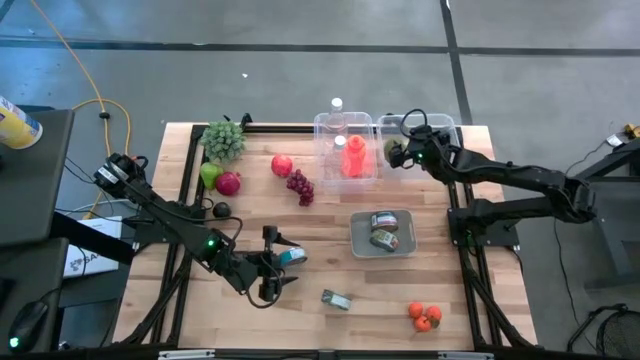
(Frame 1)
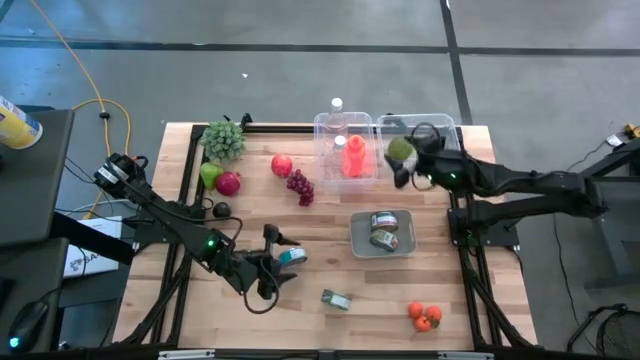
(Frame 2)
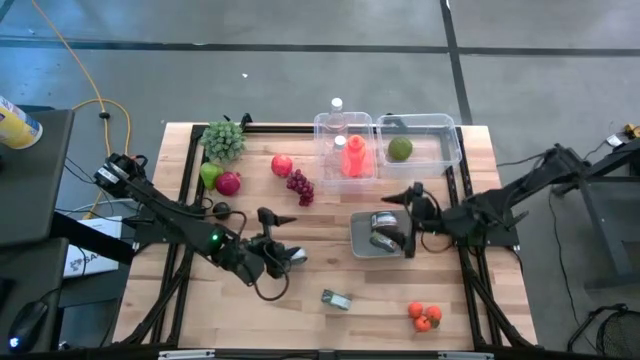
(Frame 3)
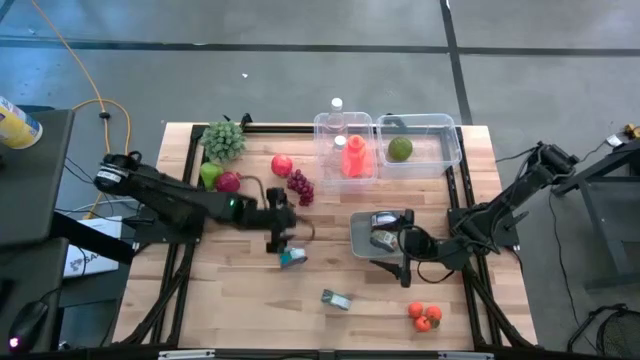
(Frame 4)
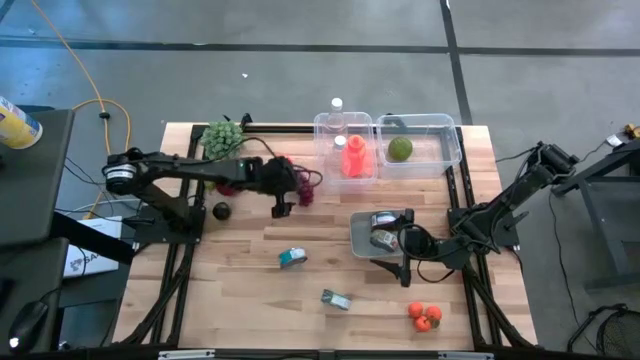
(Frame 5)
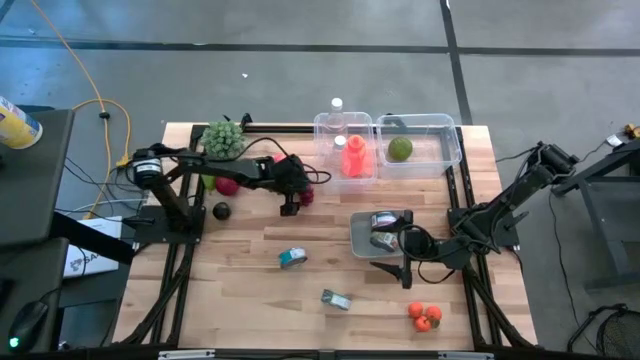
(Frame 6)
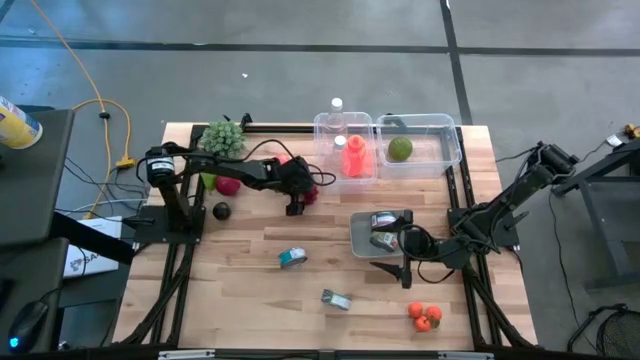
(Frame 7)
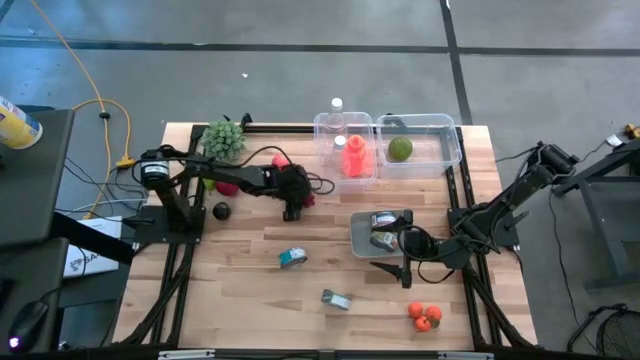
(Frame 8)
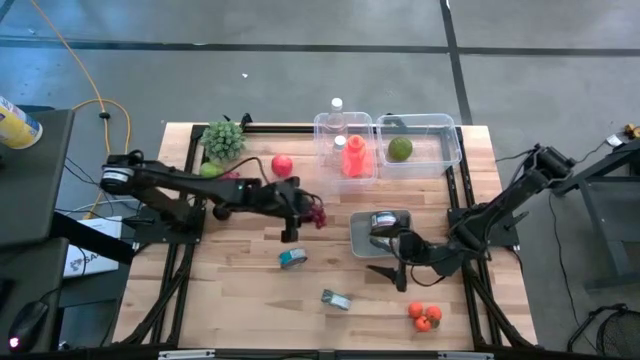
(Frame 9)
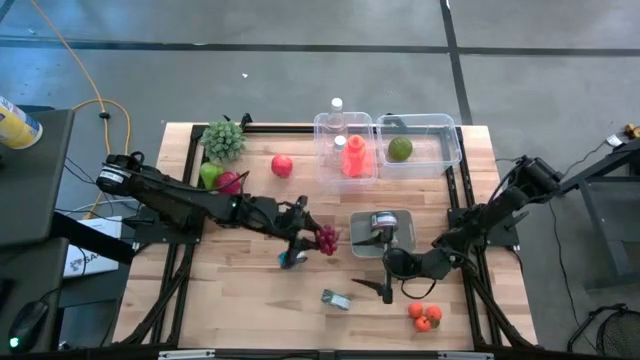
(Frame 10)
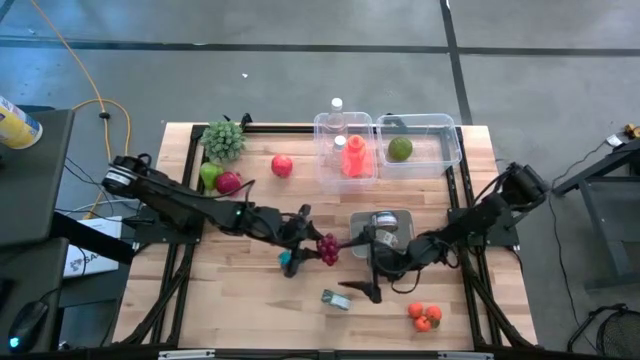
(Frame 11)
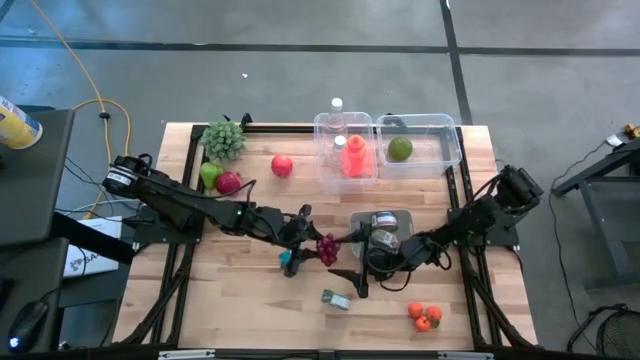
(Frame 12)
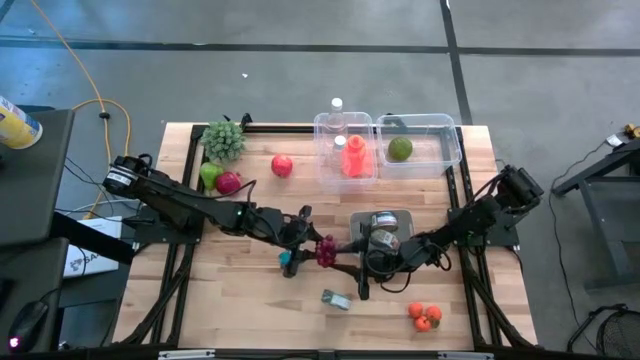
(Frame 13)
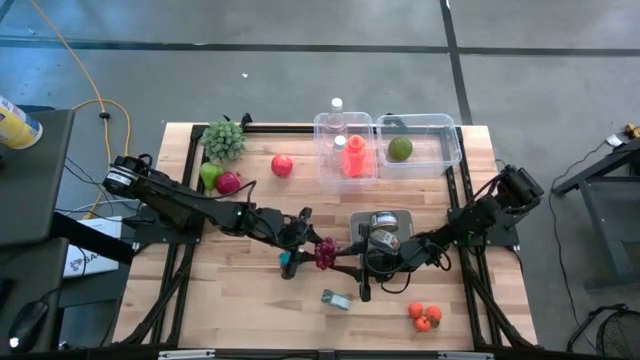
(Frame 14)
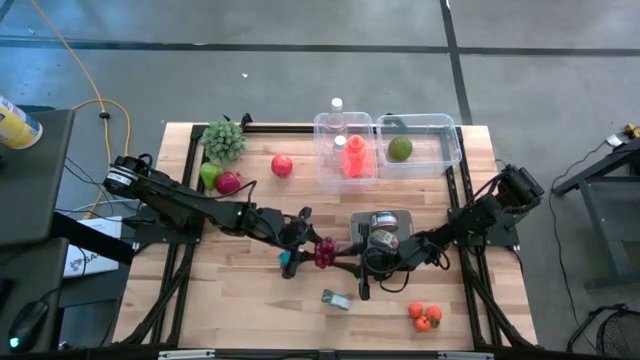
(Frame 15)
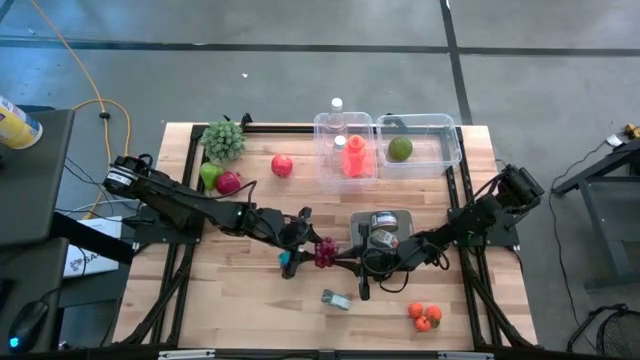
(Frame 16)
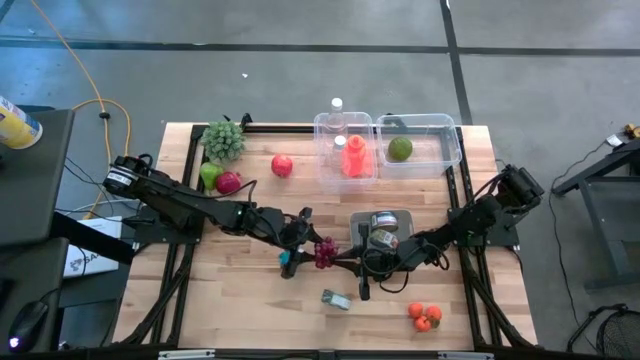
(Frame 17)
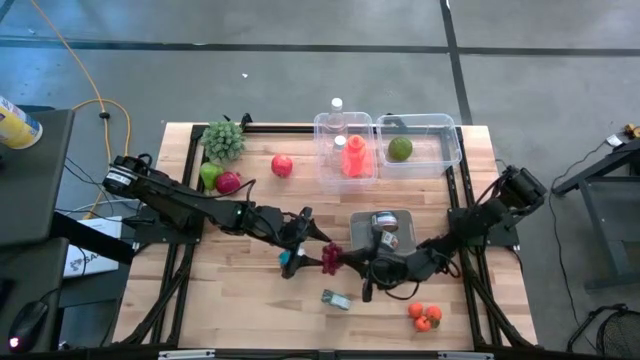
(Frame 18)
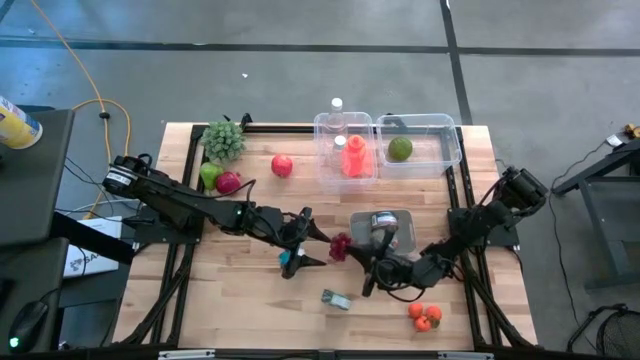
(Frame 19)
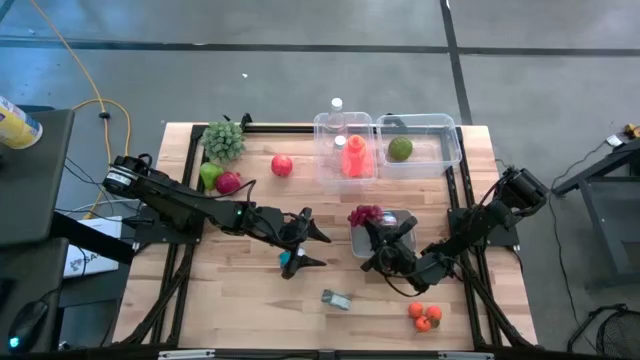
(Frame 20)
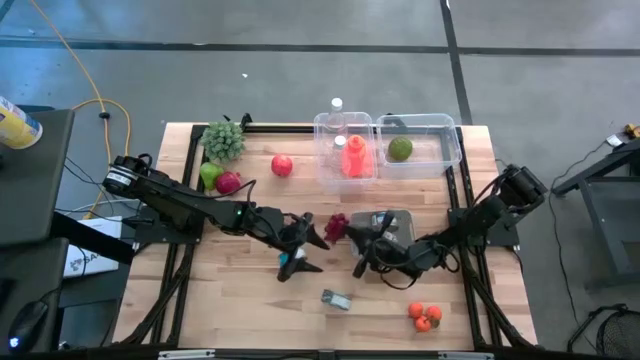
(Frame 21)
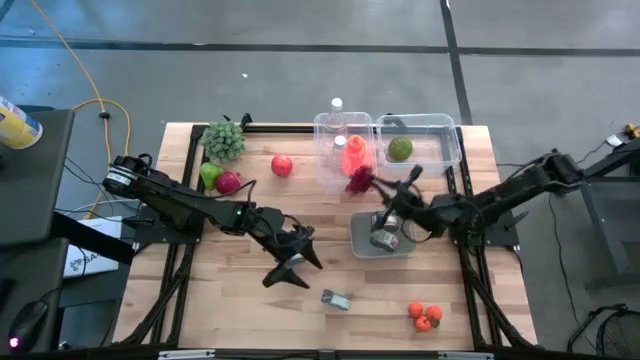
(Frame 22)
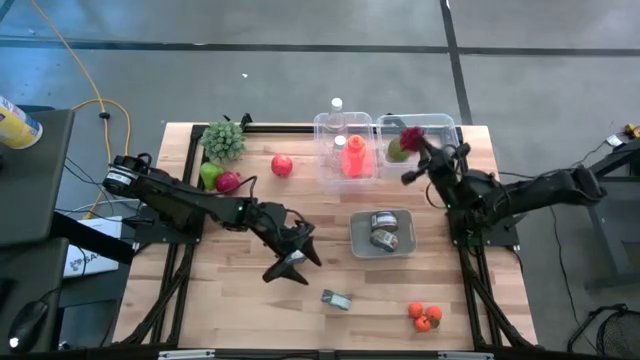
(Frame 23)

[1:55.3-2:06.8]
Task: Pick & Place Food Item
Put the grapes into the right transparent bin

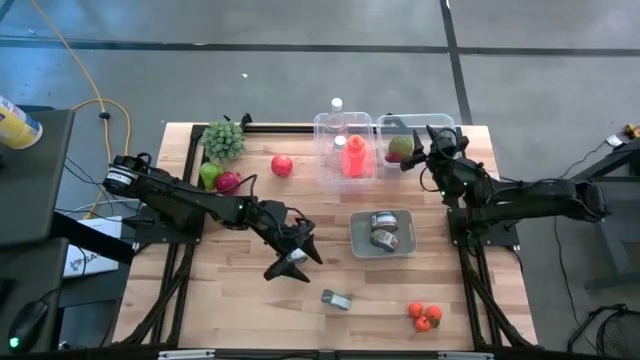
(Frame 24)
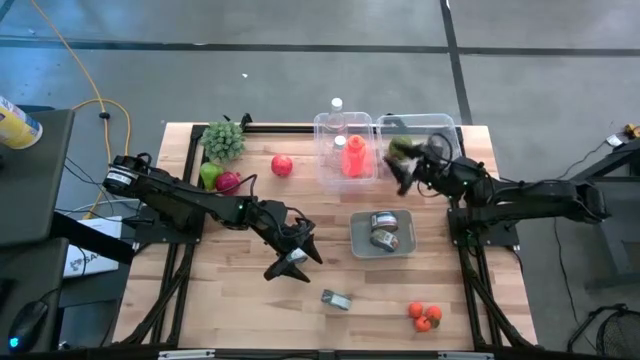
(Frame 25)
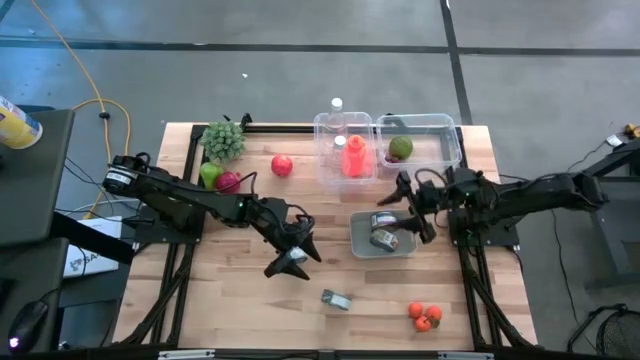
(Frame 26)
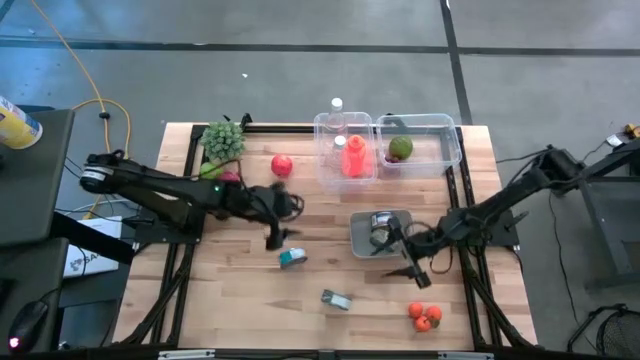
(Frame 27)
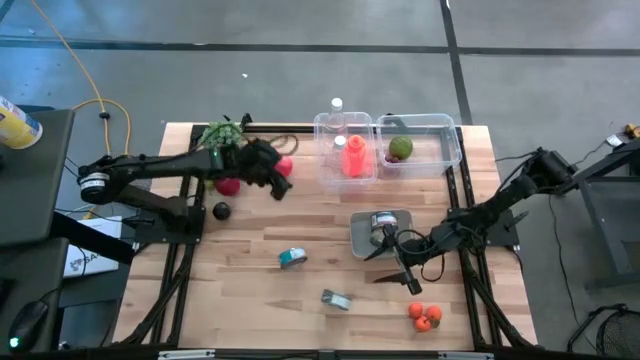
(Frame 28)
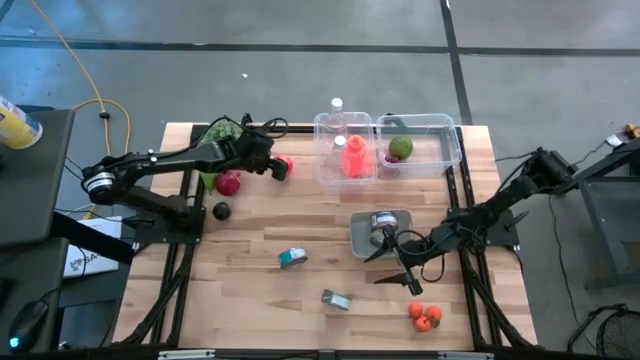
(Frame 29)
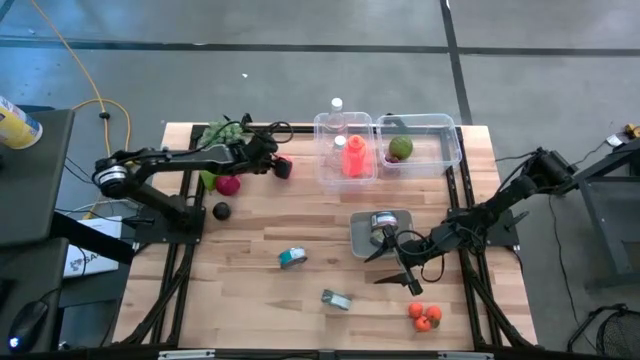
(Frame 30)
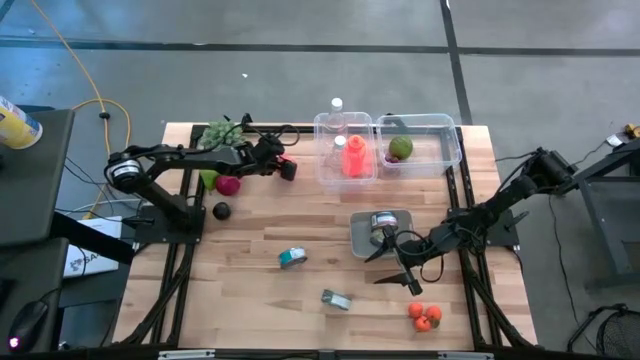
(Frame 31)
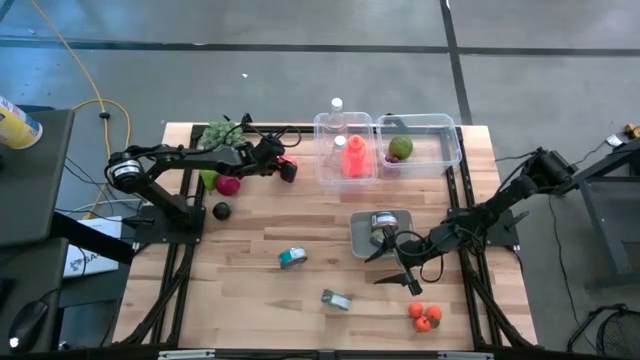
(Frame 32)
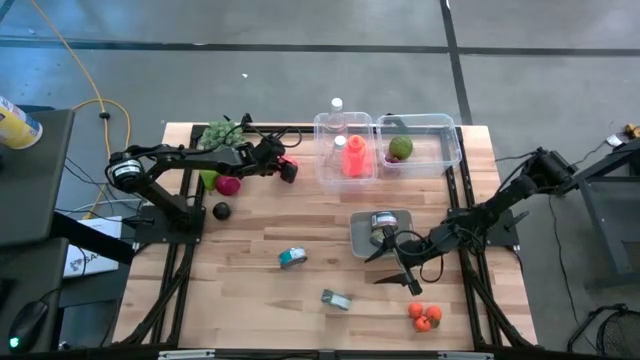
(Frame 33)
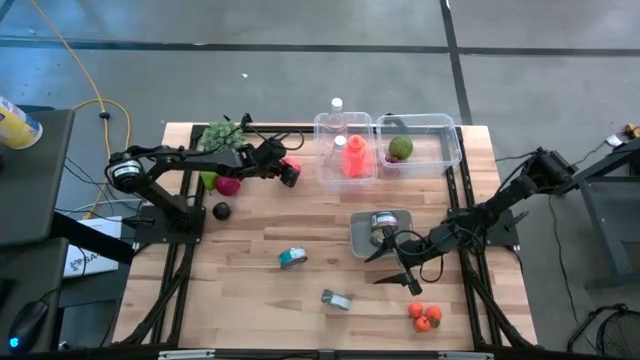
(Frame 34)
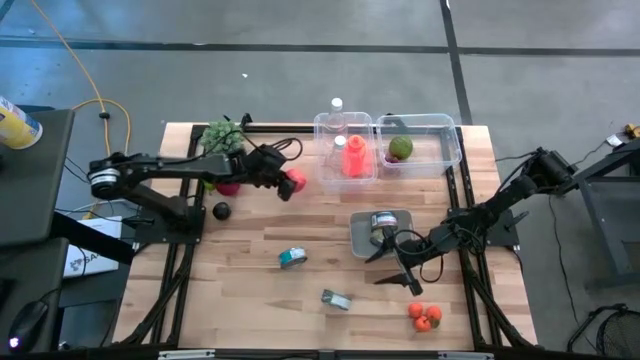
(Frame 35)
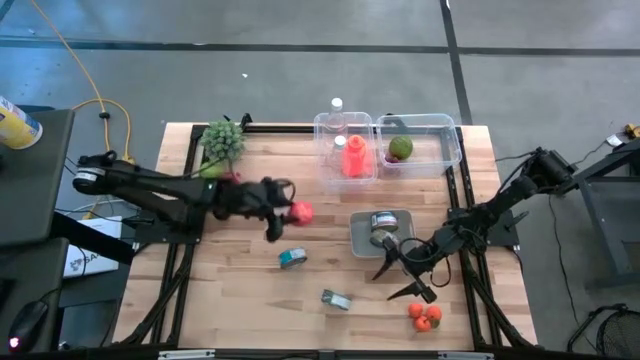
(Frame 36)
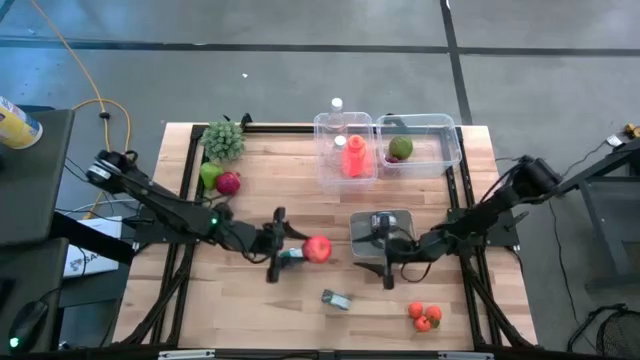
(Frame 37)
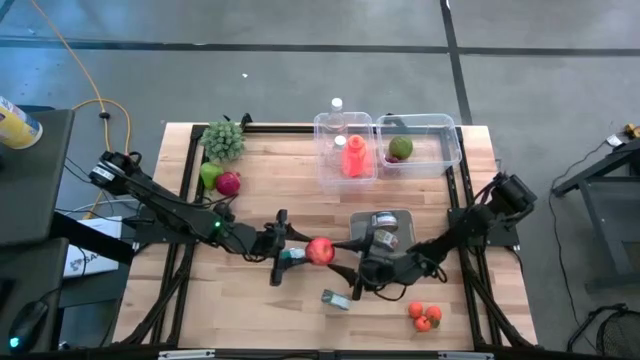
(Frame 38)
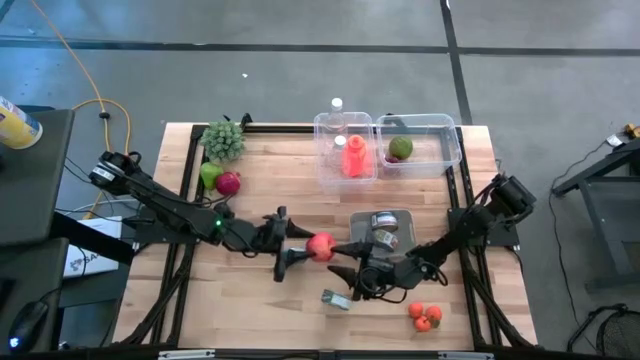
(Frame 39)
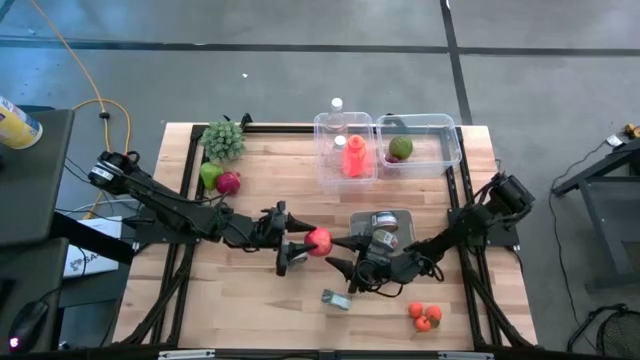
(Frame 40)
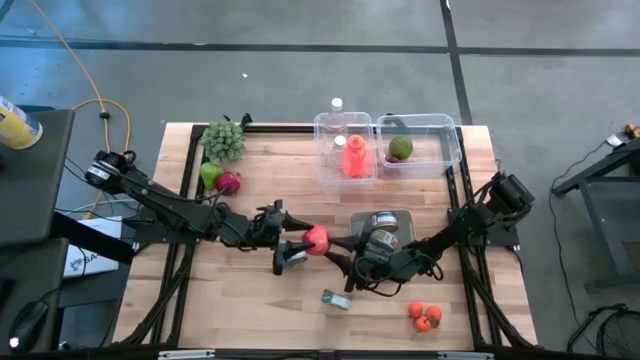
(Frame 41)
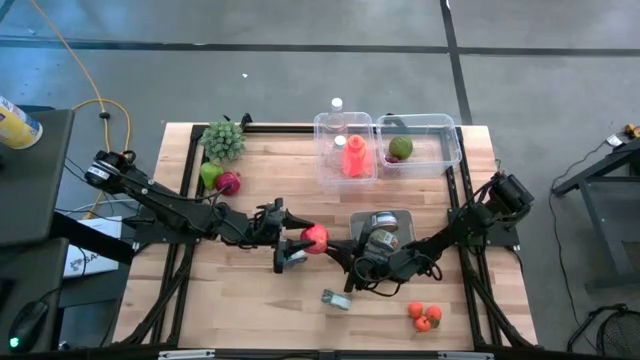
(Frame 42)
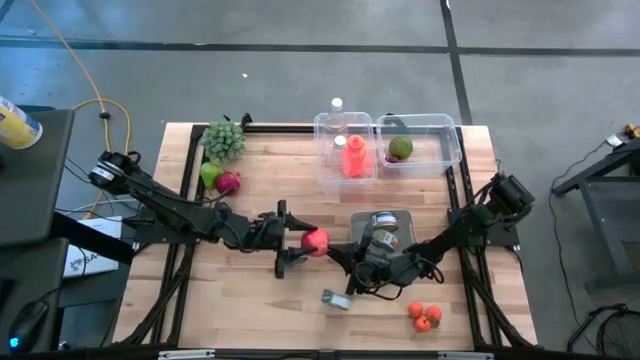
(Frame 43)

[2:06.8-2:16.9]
Put the red apple into the right transparent bin

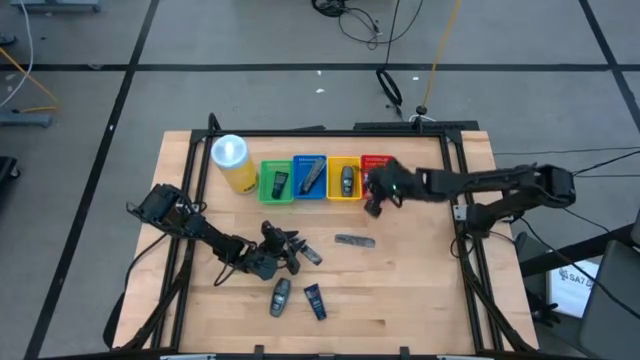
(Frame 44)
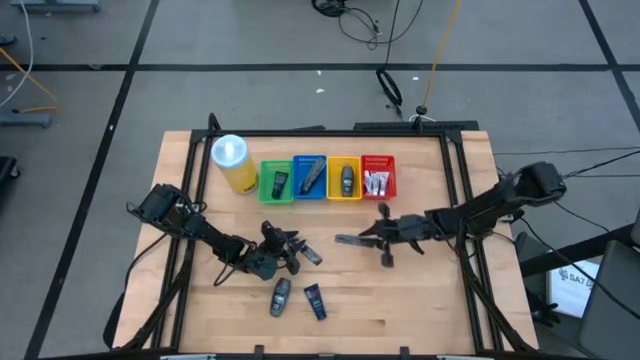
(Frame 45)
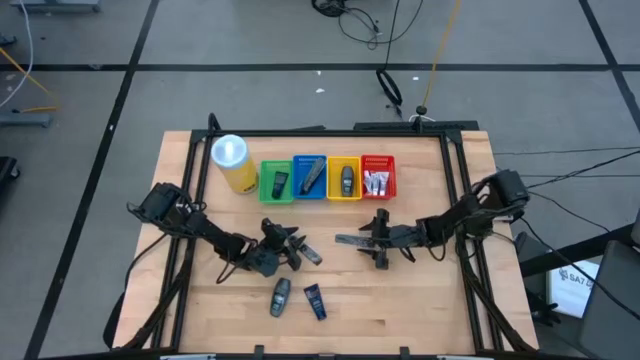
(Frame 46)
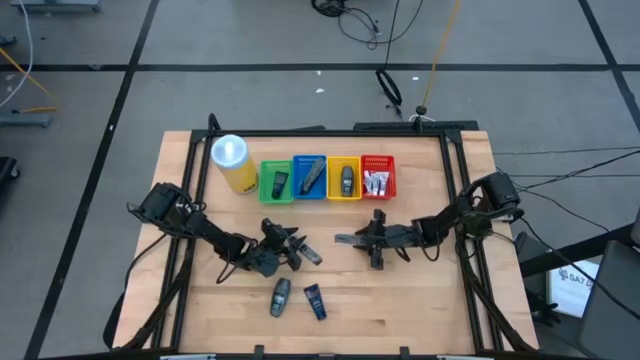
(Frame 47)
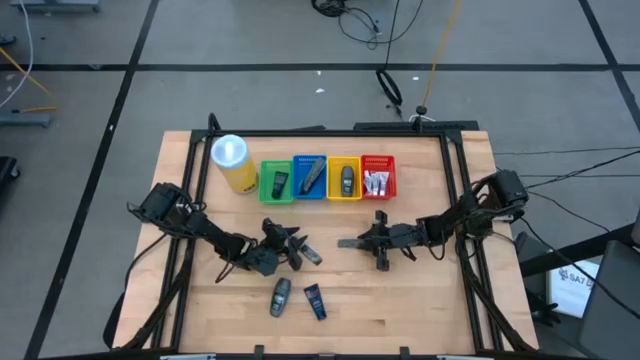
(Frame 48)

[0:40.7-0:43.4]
Task: Pick & Place Travel size toiletries
Put the hair comb into the blue basket
